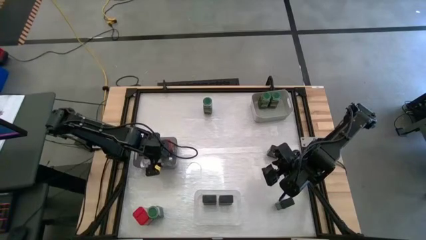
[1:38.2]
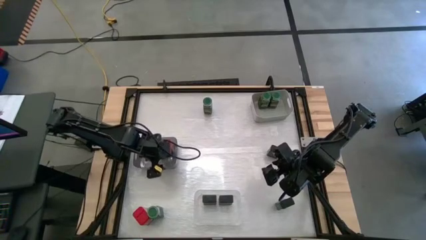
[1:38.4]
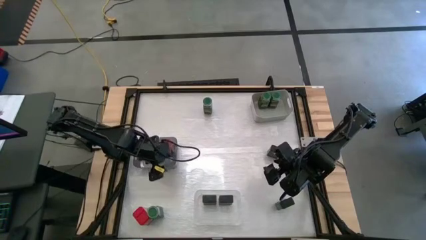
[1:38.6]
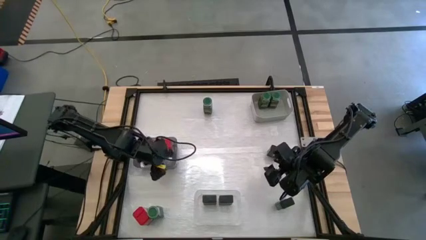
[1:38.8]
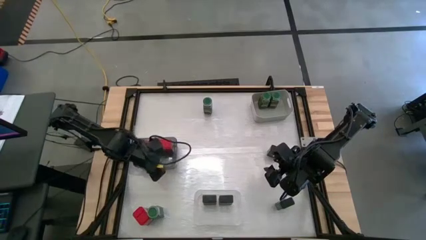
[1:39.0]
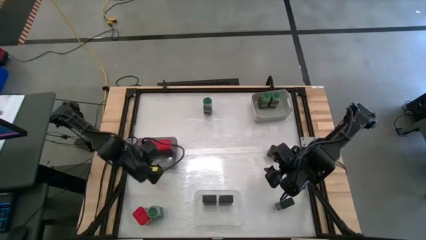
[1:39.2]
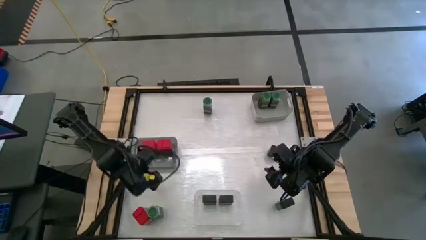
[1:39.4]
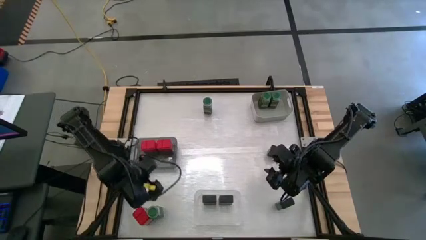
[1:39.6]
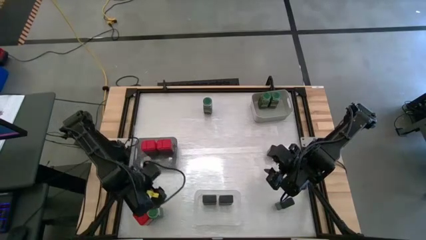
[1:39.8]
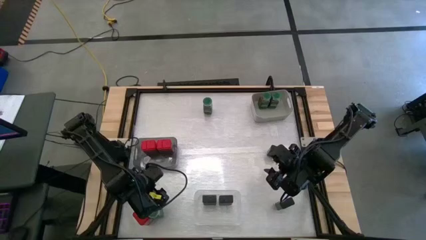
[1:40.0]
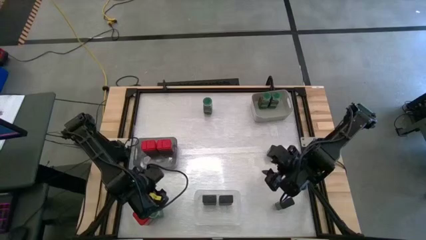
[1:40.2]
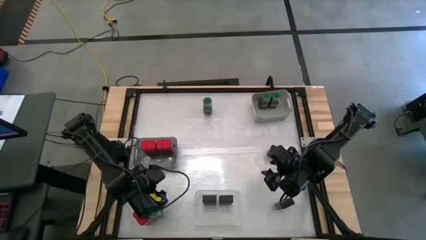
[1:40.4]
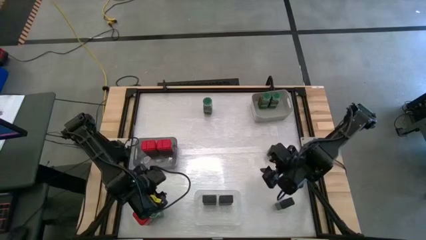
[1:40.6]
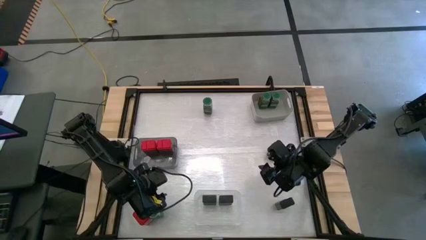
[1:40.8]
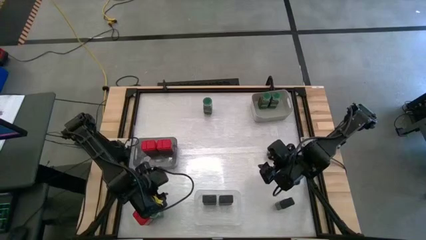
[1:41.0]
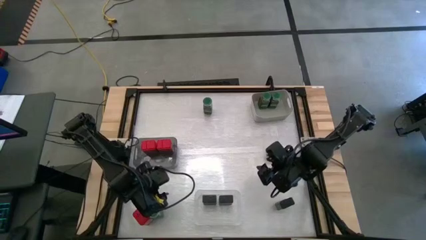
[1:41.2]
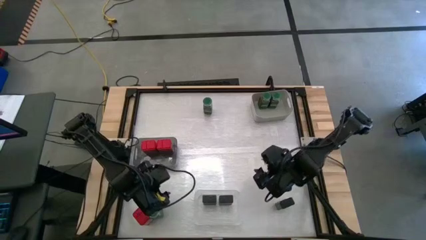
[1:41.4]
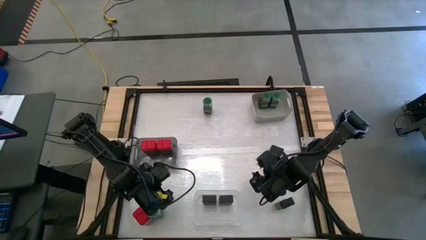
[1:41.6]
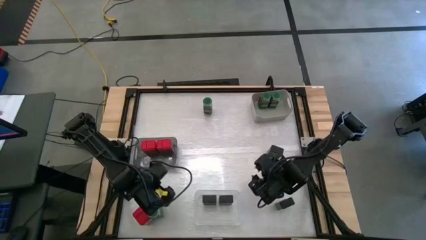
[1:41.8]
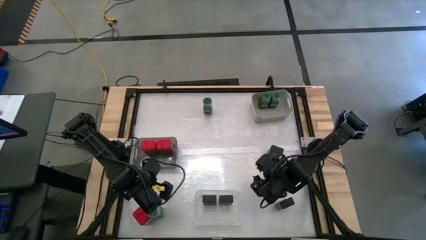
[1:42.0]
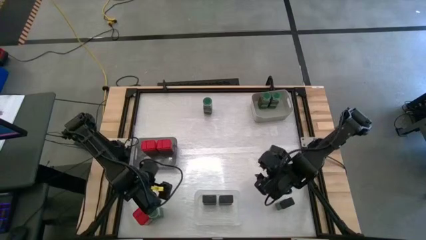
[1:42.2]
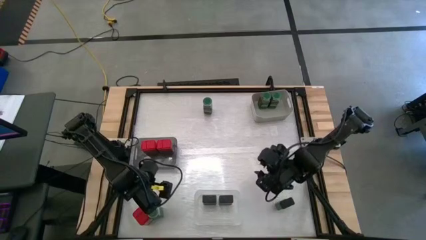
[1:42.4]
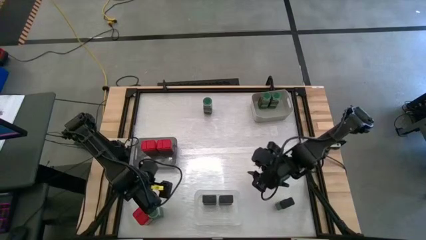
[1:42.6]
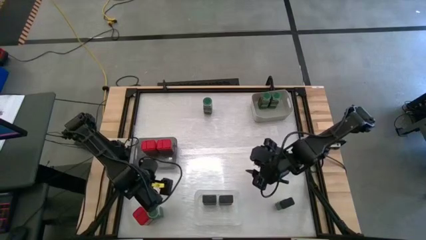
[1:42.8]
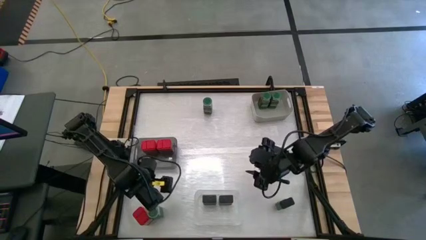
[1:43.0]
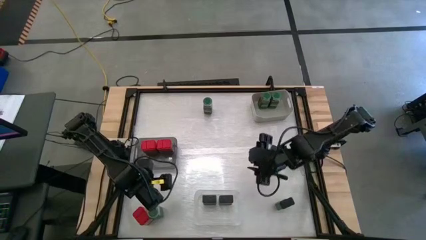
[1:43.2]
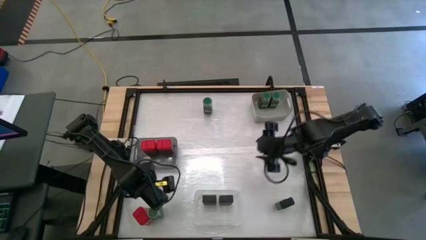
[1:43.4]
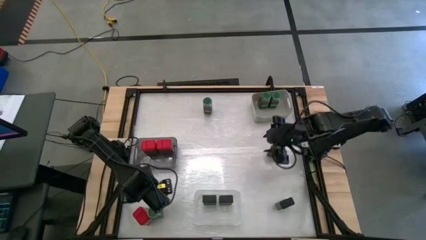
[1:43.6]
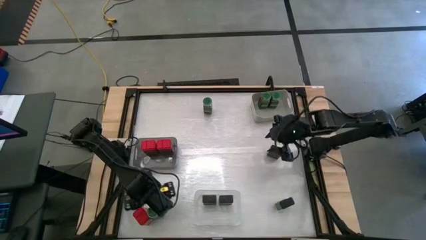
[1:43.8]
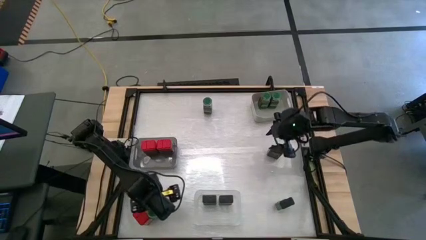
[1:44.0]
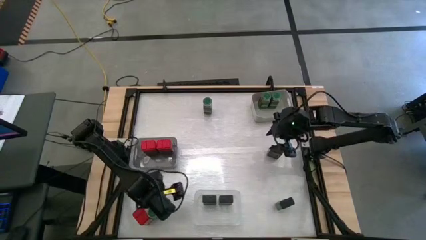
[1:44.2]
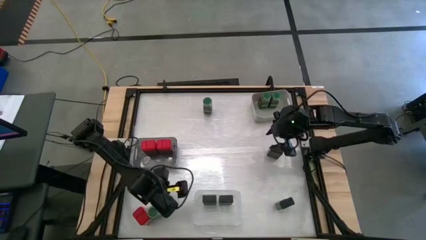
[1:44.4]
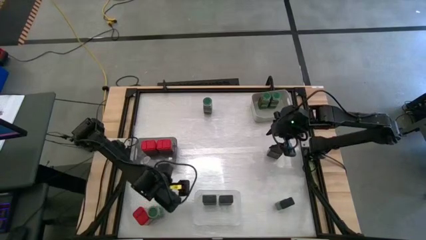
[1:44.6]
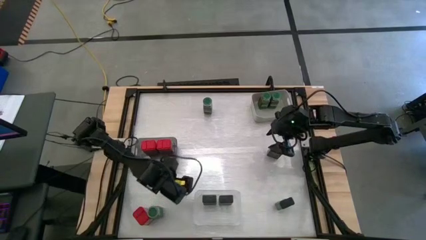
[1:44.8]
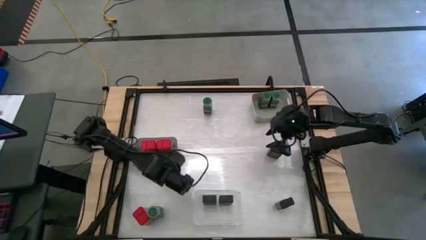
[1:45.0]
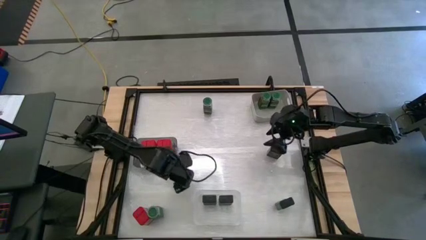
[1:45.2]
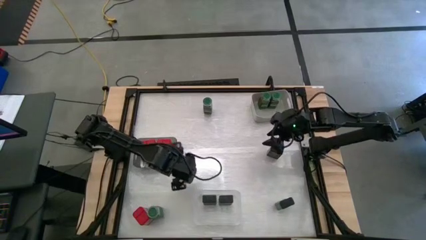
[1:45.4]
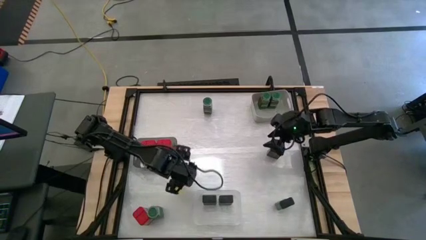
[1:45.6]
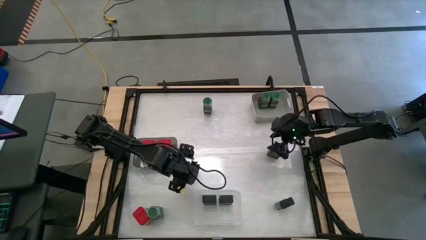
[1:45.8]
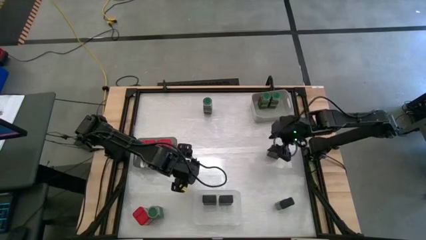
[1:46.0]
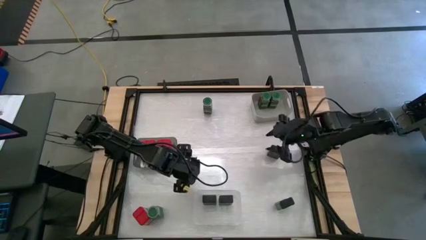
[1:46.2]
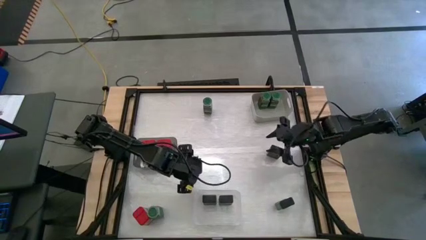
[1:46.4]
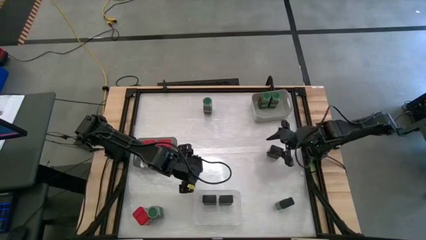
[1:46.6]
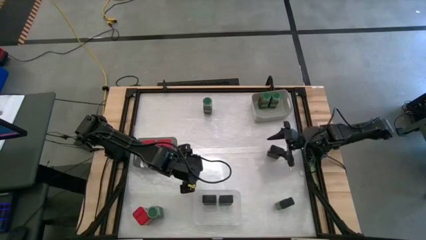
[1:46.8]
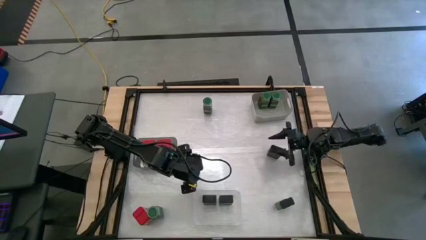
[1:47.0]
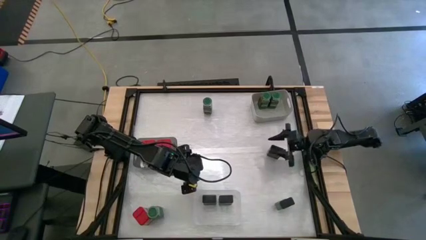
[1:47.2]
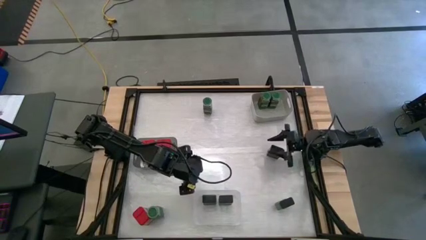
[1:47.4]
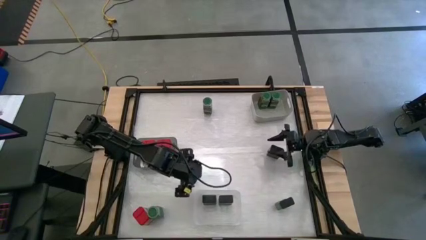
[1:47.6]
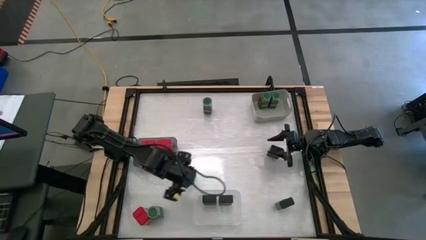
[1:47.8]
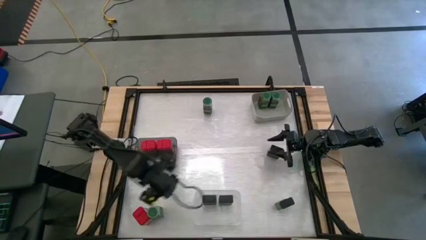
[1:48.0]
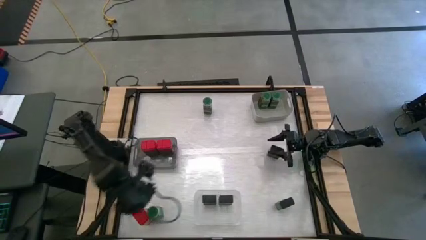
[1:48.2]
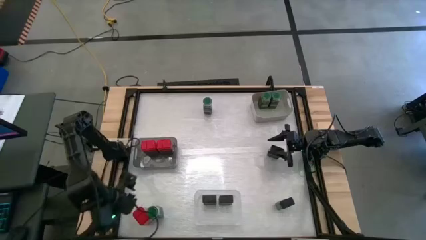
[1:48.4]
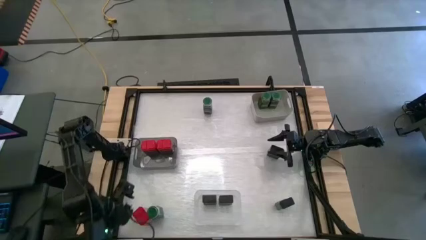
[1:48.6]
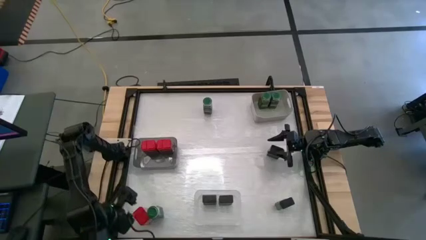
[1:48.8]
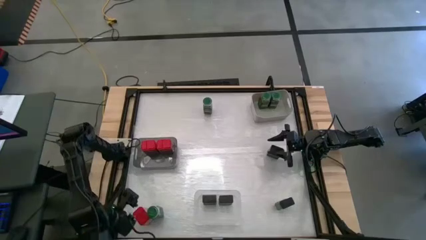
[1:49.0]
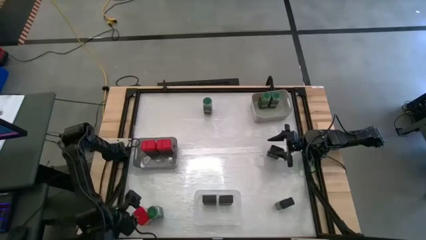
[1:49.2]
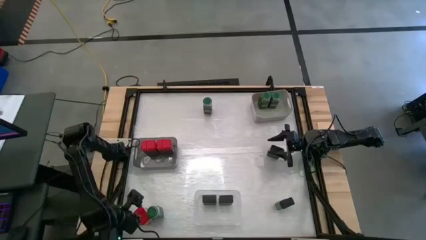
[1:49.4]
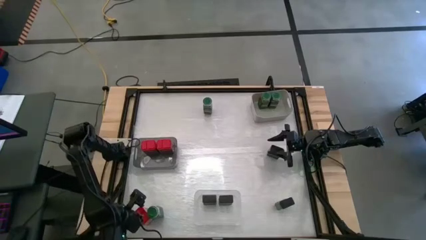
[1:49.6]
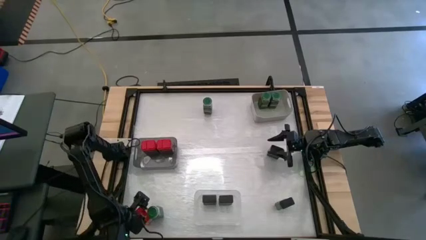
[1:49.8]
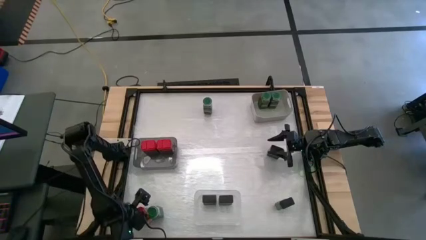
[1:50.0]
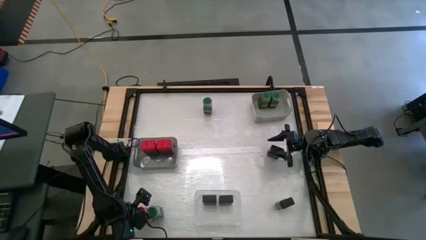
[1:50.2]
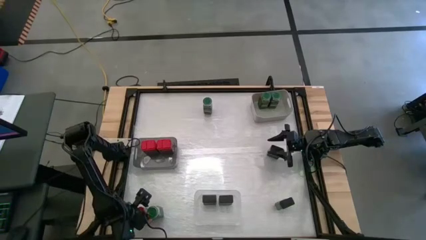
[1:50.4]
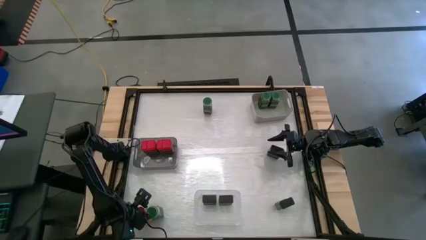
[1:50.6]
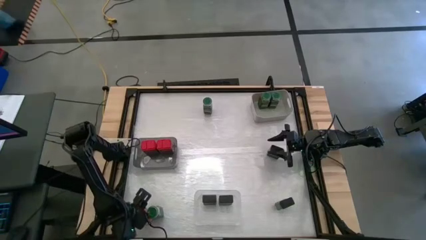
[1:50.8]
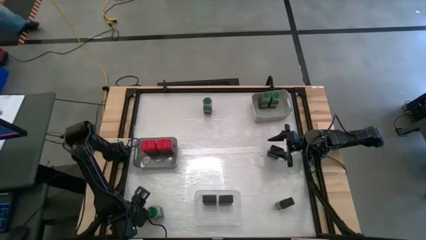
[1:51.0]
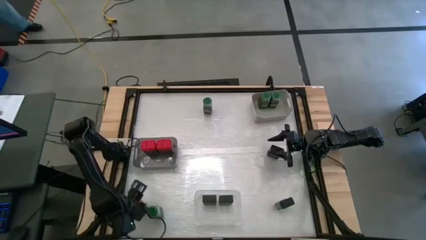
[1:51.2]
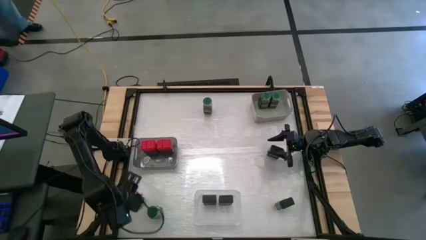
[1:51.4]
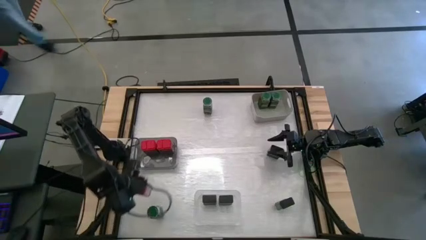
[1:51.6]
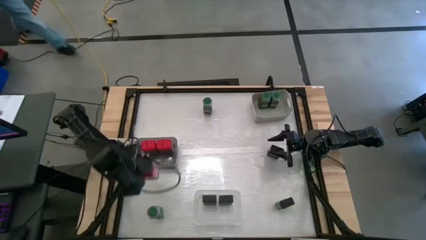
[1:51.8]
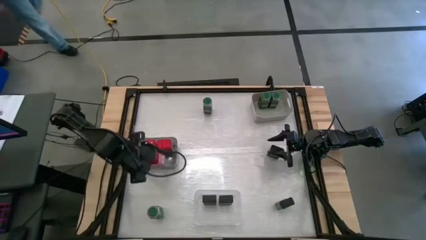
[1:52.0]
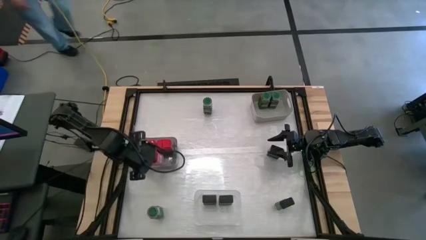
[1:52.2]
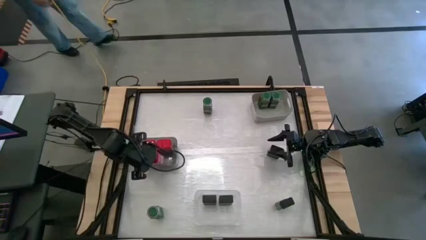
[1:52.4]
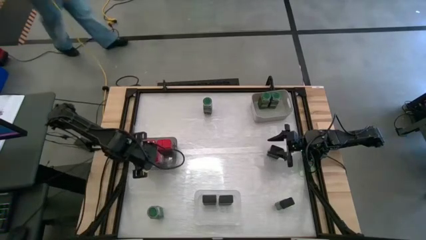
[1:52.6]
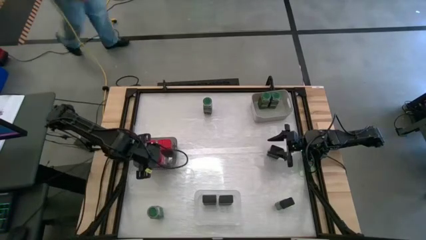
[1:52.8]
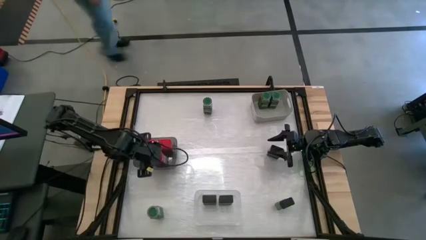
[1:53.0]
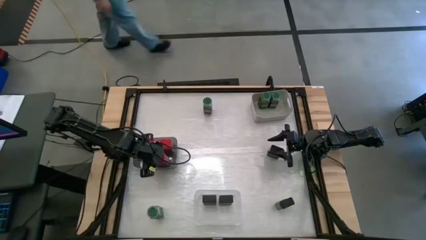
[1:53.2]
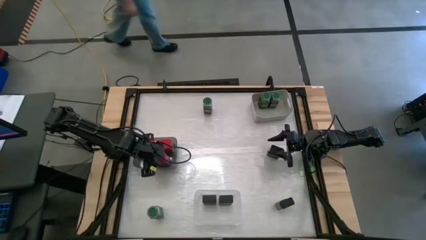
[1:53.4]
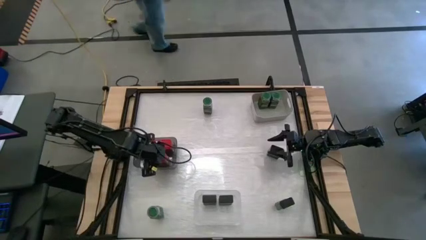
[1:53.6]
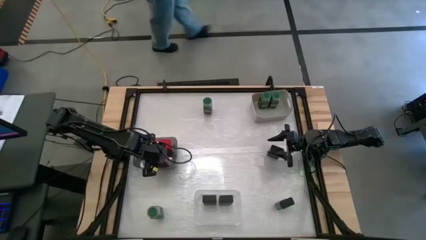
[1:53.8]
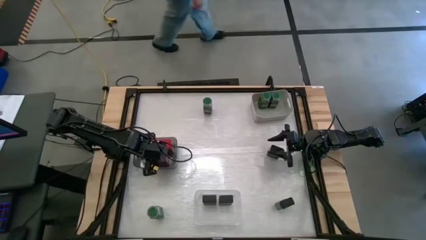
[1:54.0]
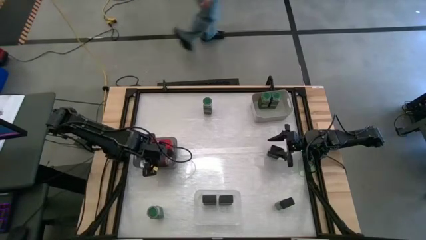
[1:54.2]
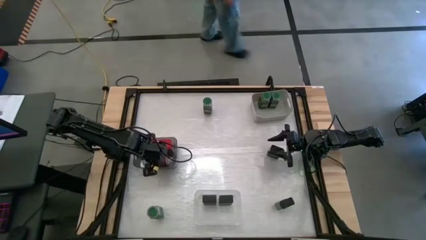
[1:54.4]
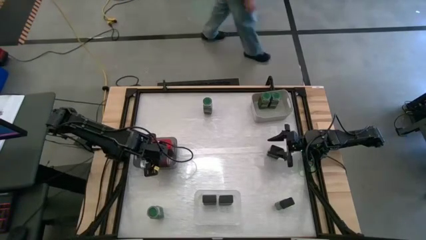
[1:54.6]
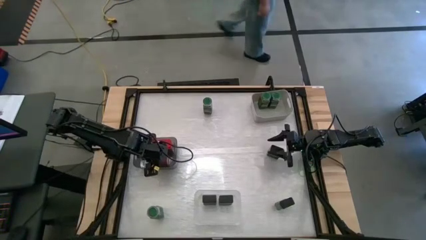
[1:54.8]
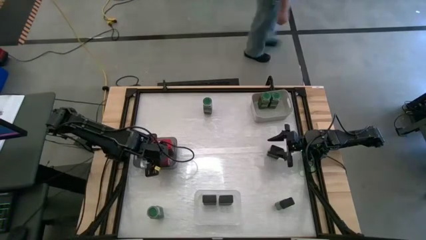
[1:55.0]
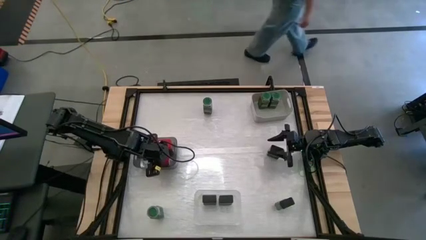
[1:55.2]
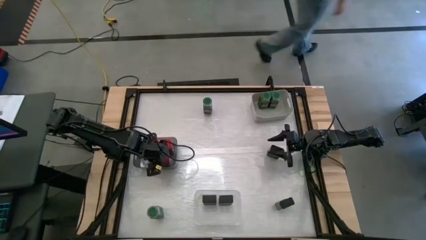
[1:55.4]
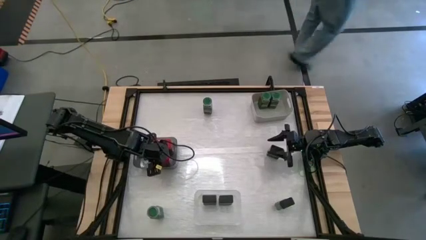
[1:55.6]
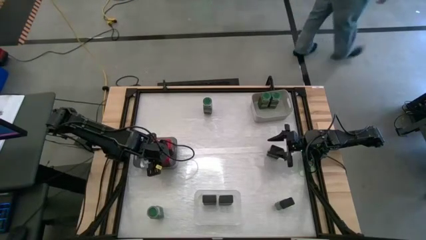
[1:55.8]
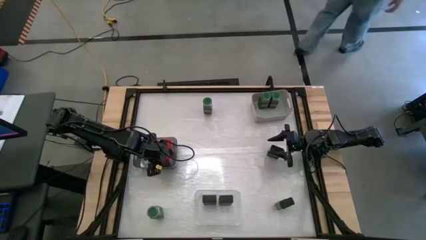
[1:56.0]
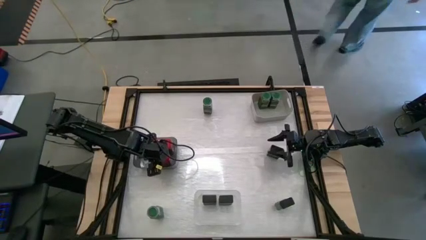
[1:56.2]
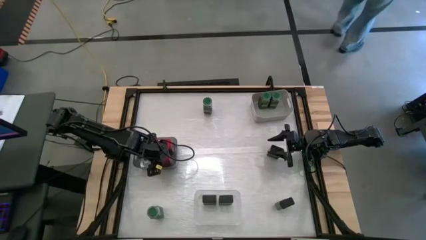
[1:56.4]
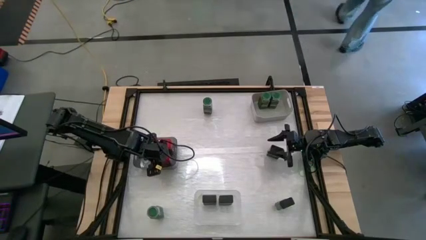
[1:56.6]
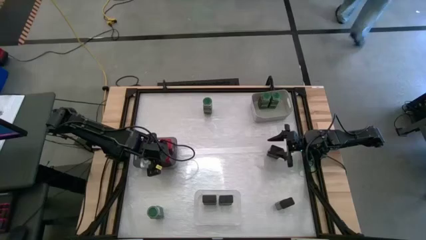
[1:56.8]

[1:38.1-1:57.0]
Task: Sort spices by type
Put the red seasoning can into the black bin
